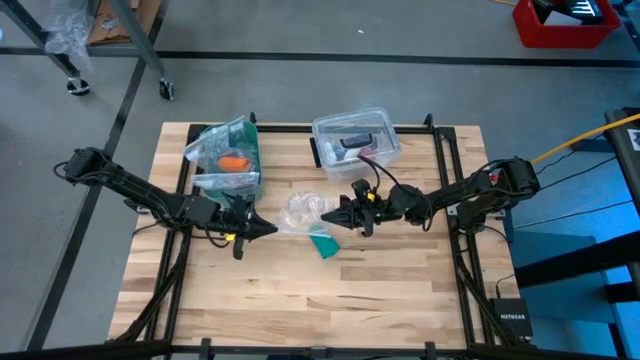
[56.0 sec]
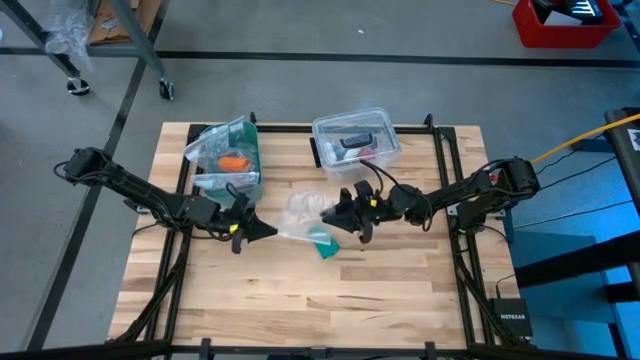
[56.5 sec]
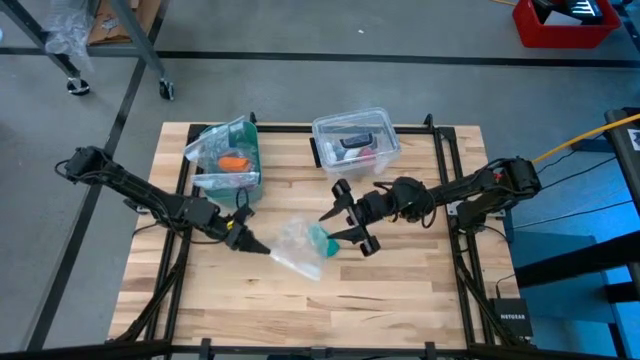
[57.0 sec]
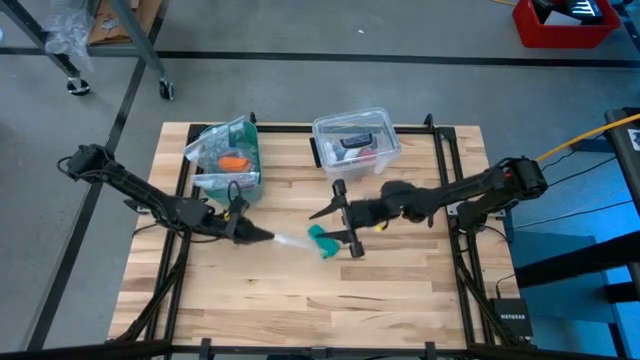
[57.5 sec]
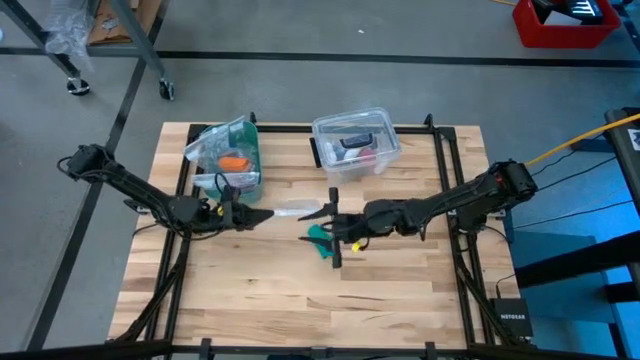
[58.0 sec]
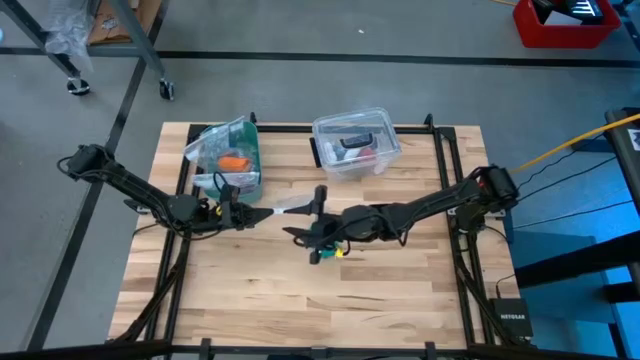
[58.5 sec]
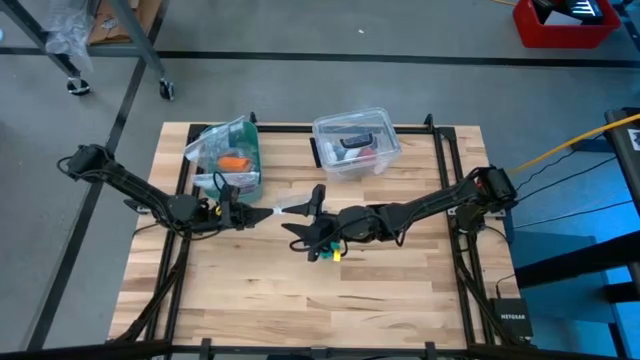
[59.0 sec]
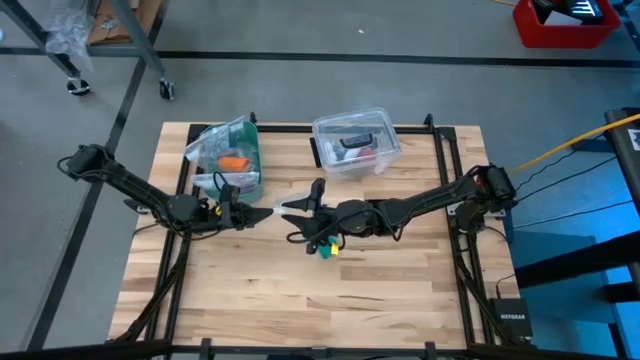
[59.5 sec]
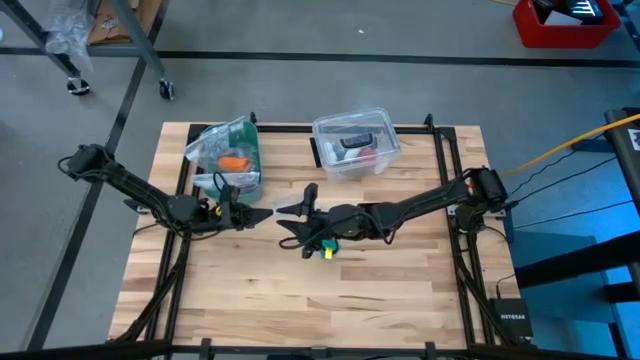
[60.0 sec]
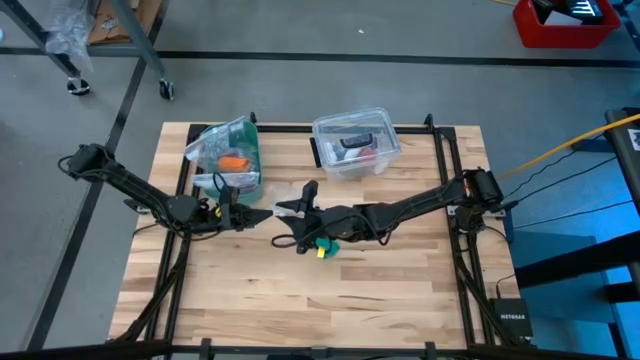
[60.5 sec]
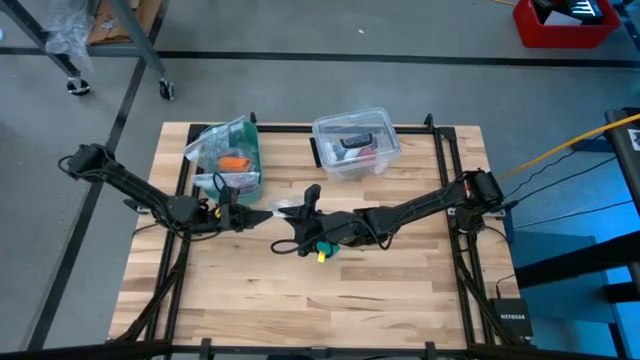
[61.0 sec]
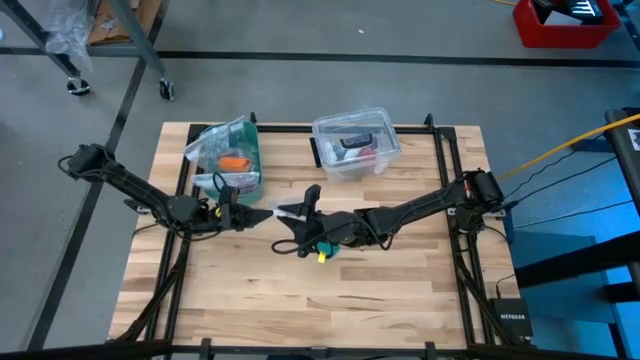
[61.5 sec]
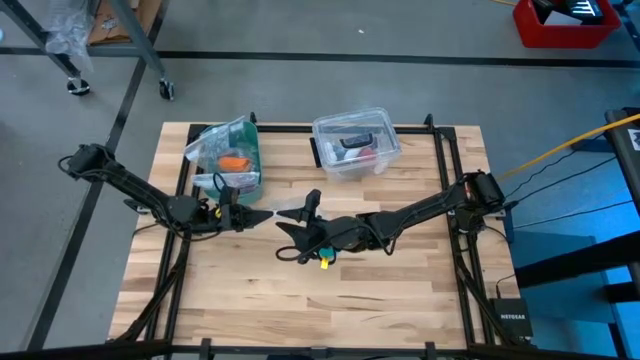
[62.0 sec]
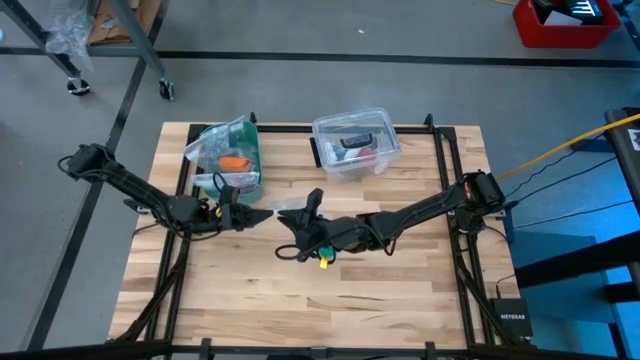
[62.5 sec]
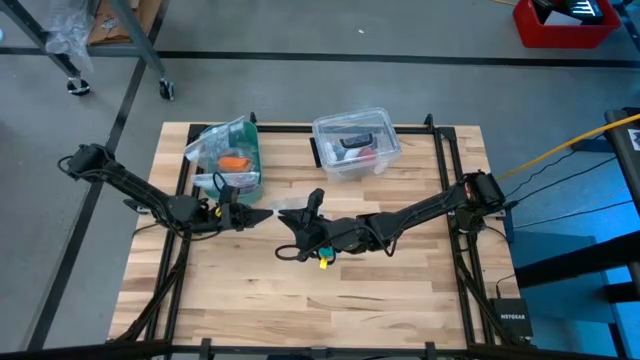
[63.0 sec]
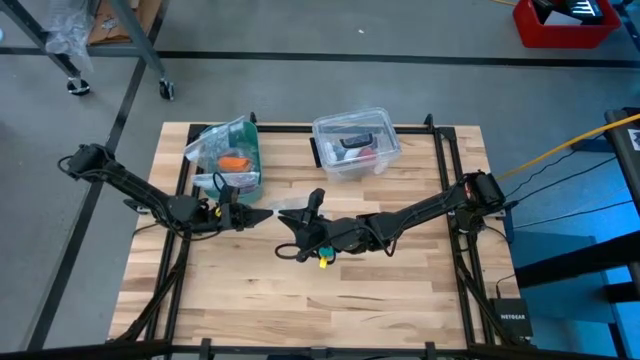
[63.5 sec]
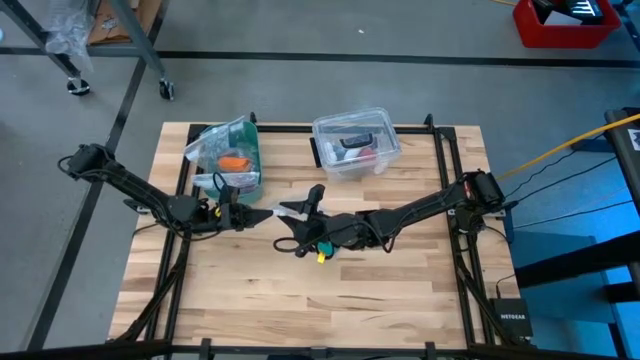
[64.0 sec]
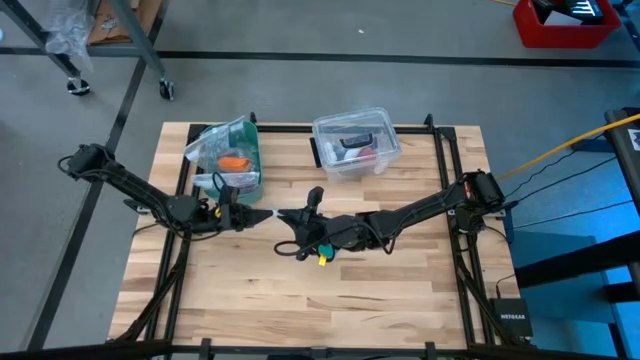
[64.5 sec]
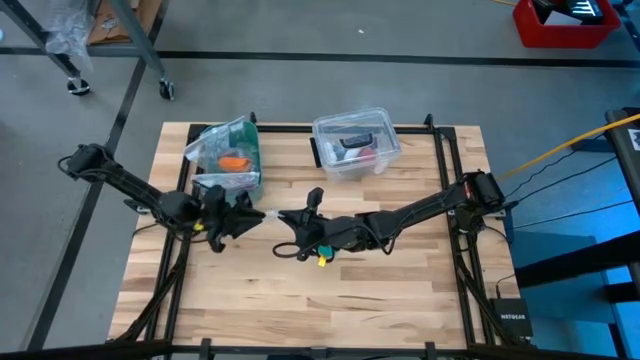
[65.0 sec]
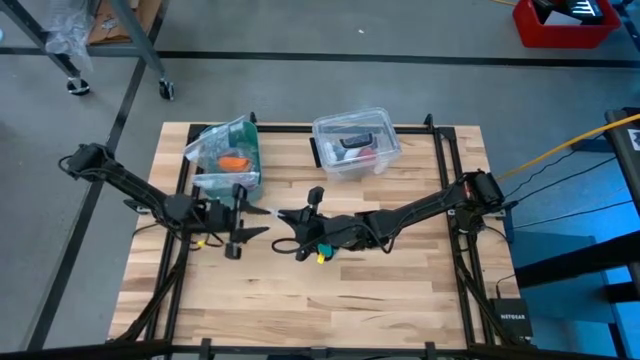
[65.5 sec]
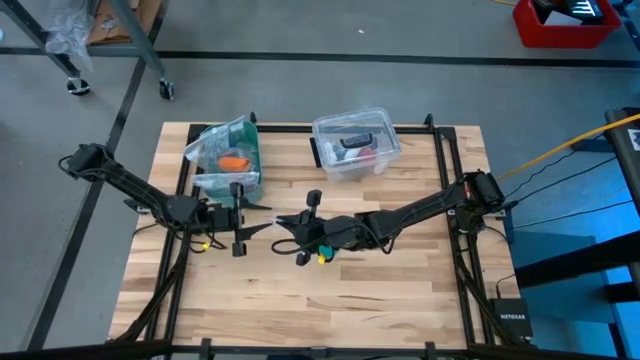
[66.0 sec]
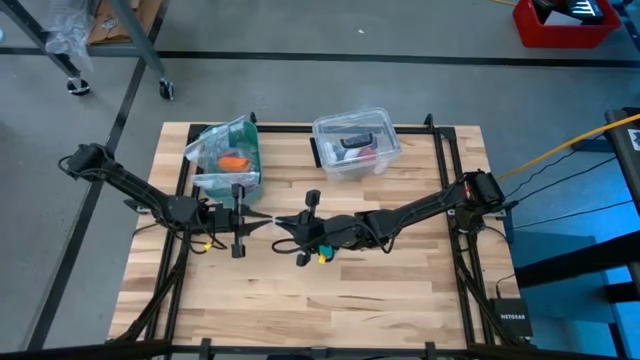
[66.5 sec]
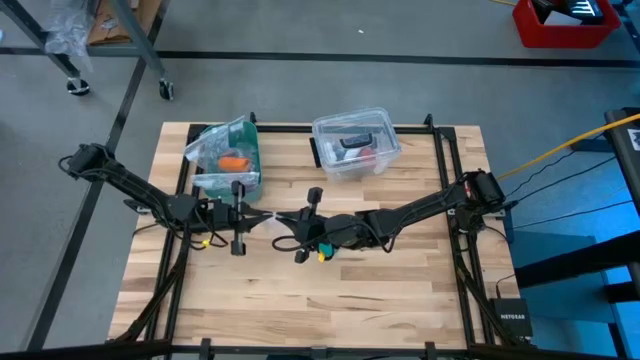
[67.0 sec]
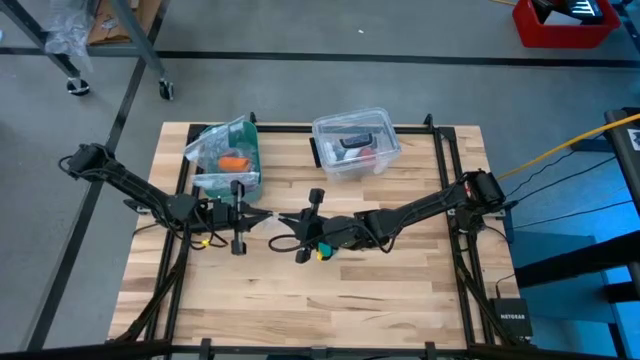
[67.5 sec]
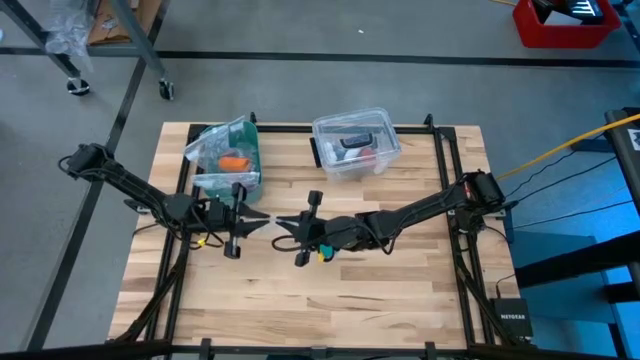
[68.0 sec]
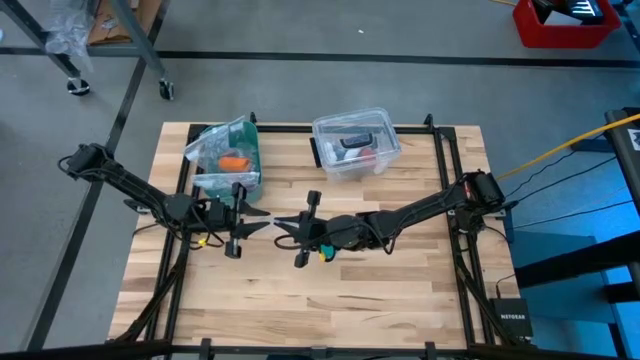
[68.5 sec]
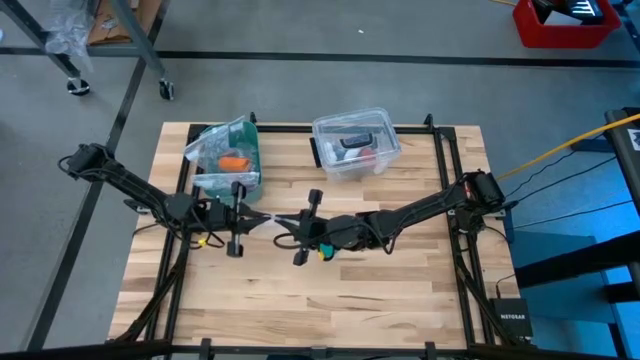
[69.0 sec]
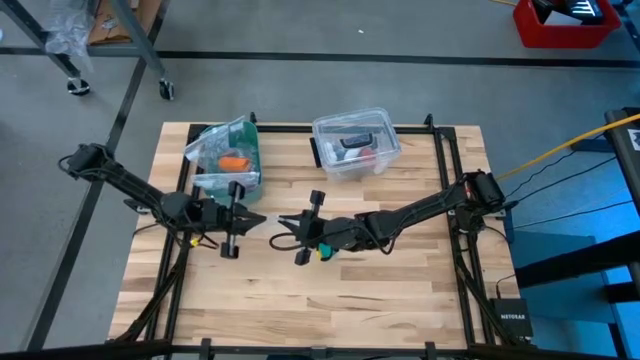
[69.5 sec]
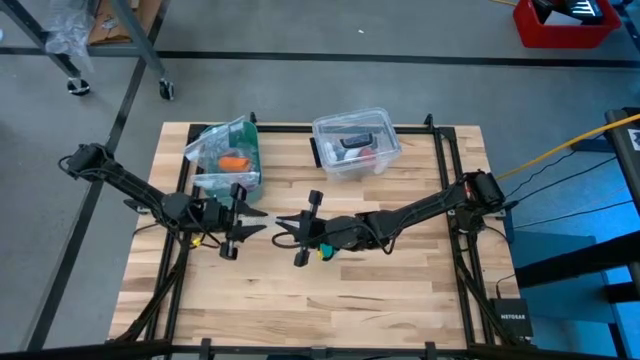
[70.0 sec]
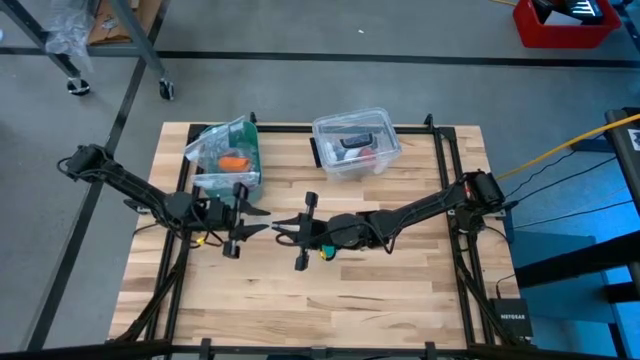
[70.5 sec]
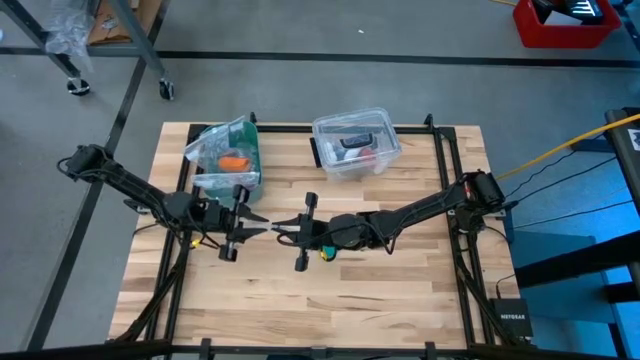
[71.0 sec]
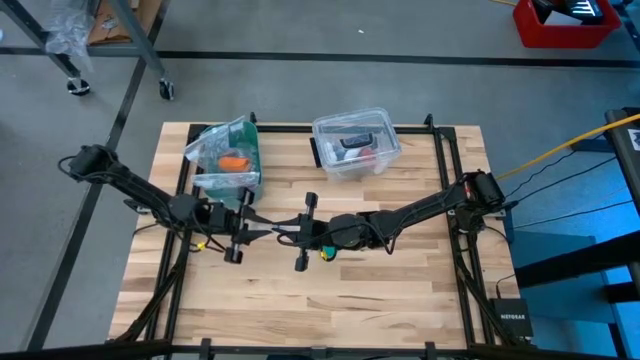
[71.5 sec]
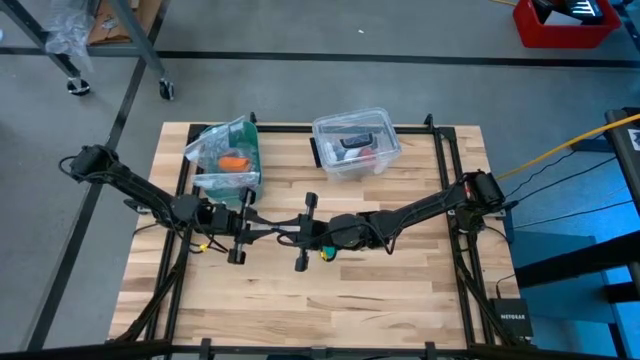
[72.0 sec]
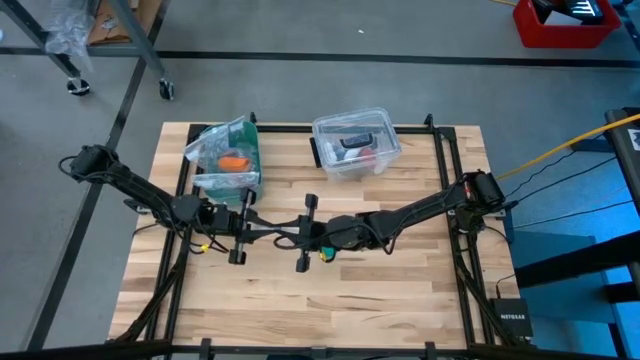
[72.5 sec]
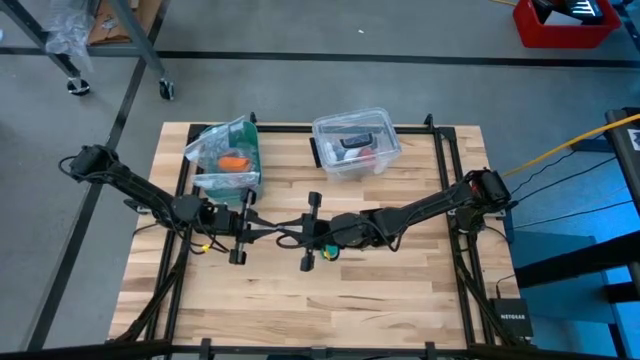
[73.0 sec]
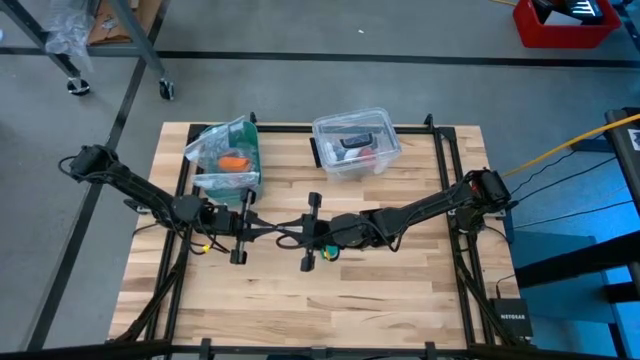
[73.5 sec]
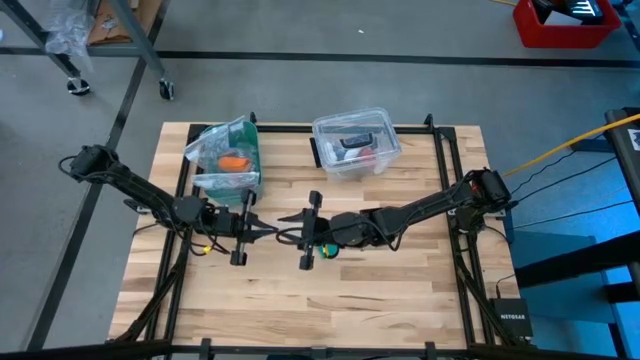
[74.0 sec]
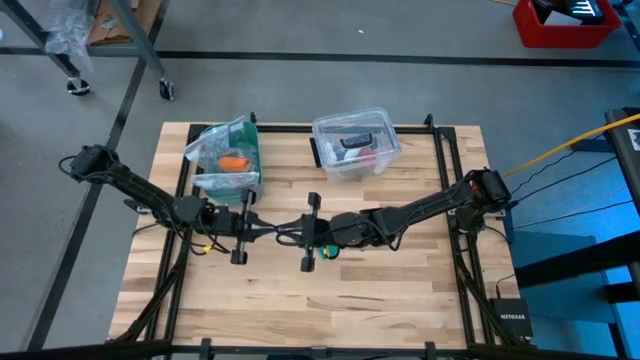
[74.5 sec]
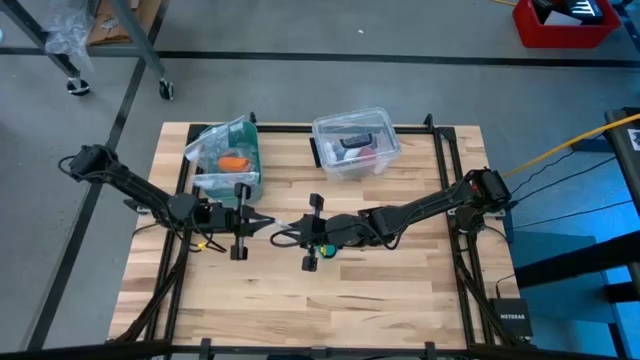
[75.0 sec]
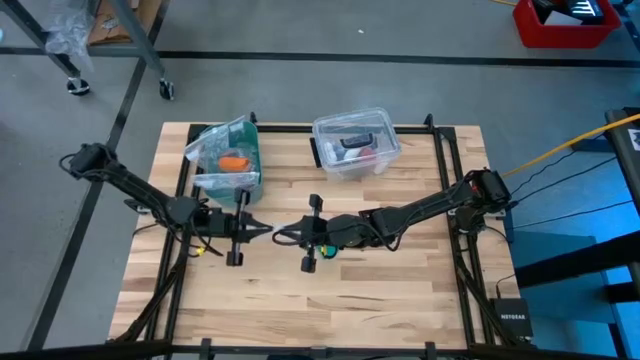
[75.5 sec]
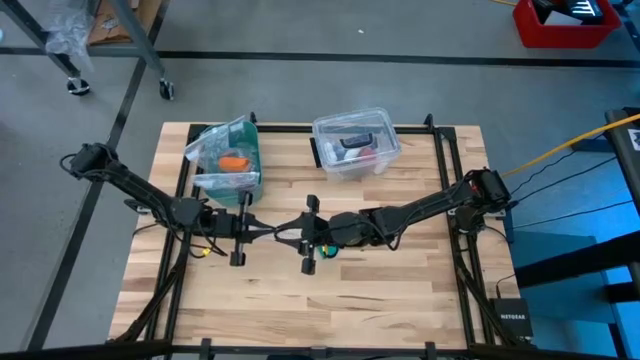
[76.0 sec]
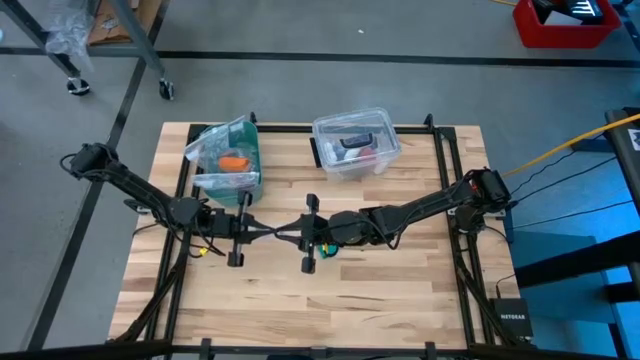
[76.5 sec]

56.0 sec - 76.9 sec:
Task: Roll bandage
Open the transparent zip bag
